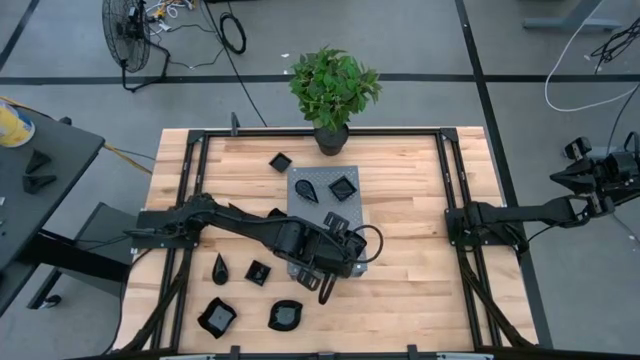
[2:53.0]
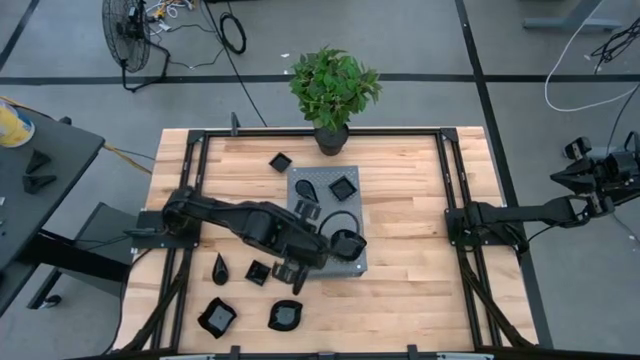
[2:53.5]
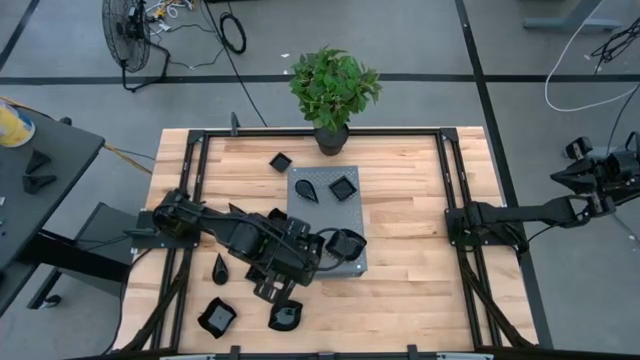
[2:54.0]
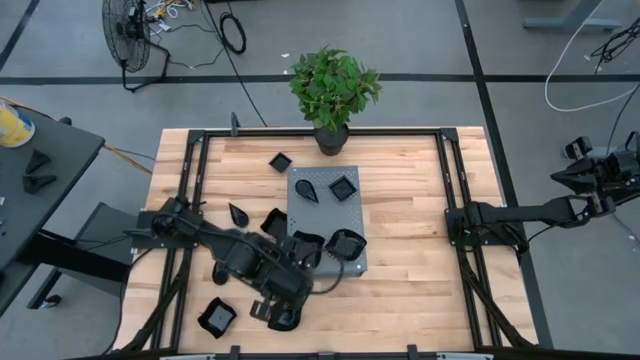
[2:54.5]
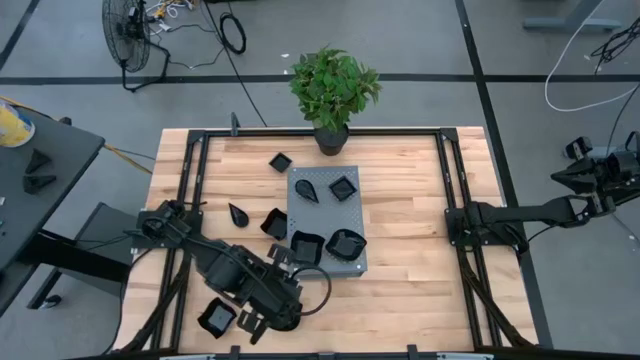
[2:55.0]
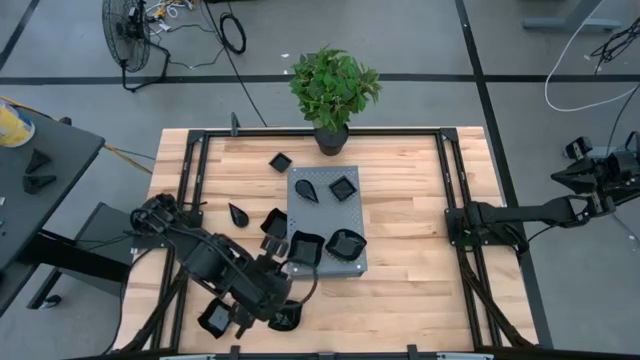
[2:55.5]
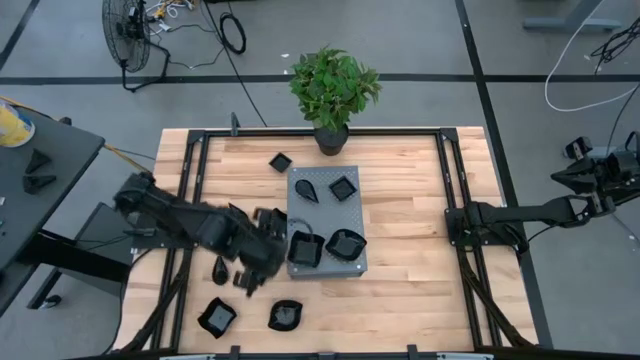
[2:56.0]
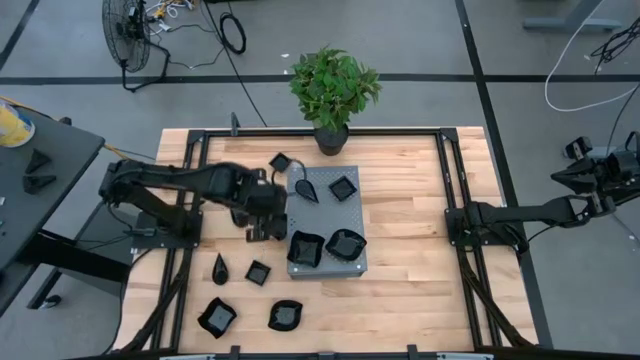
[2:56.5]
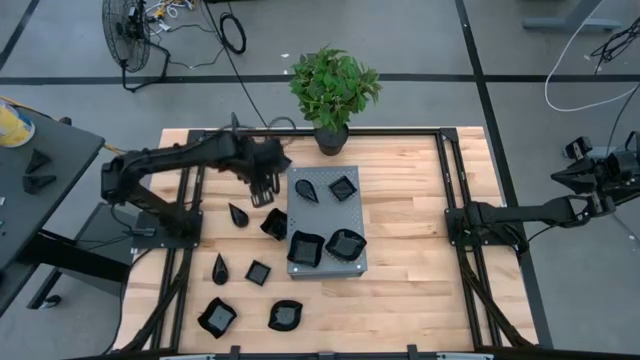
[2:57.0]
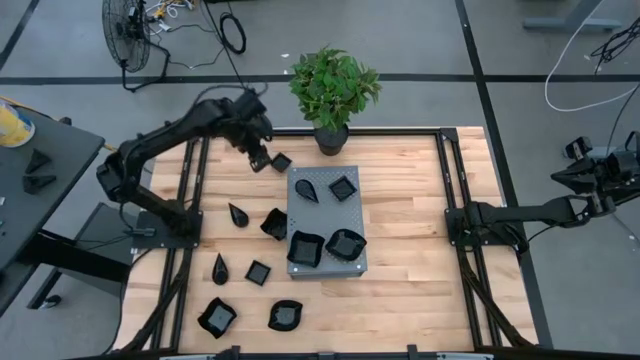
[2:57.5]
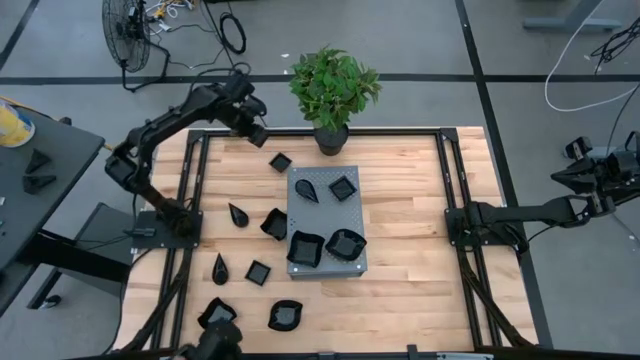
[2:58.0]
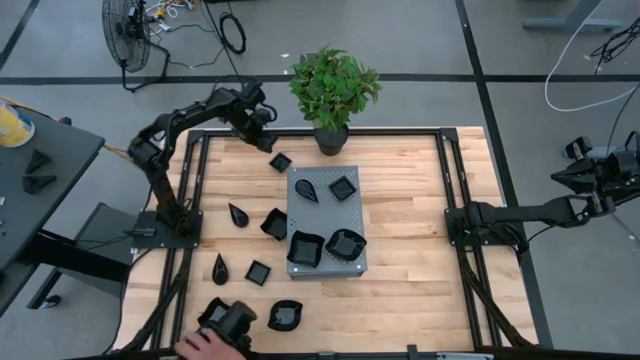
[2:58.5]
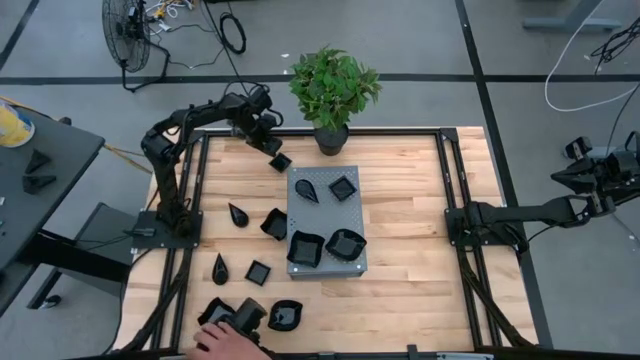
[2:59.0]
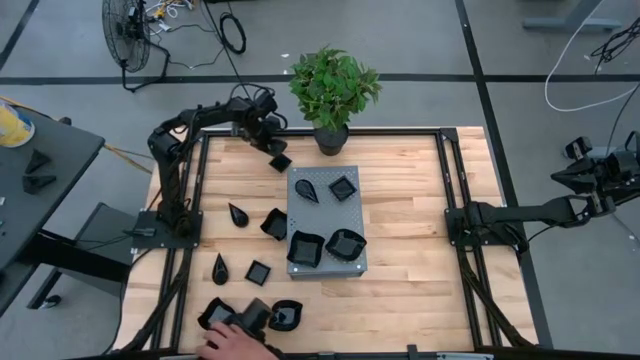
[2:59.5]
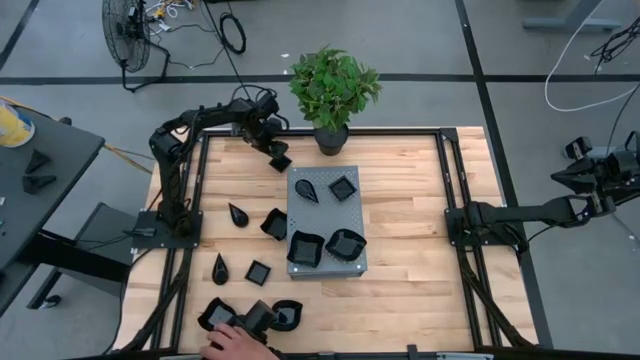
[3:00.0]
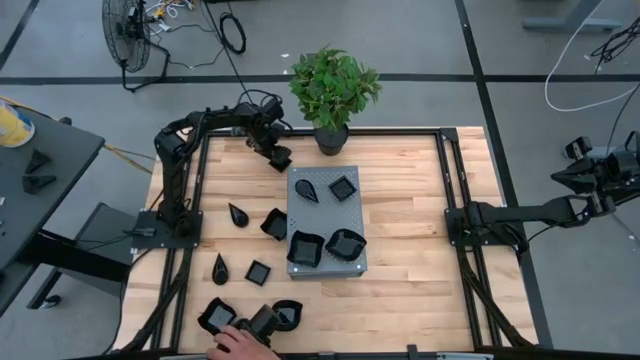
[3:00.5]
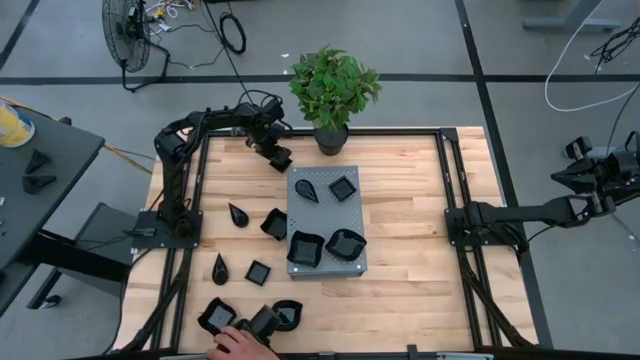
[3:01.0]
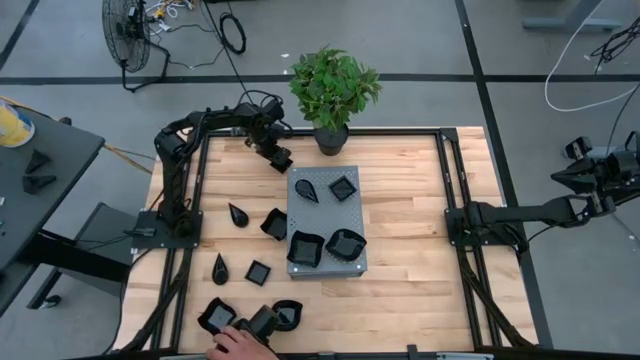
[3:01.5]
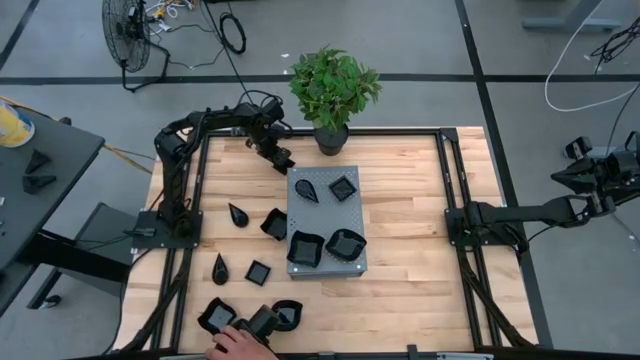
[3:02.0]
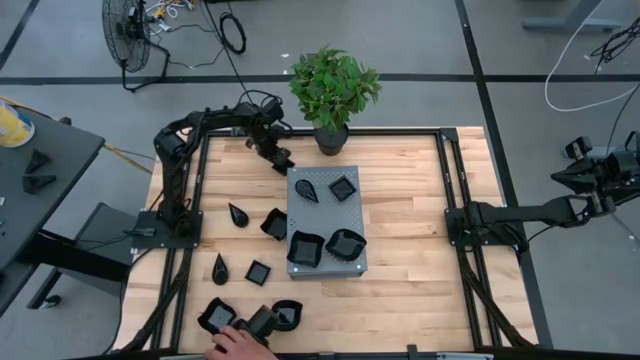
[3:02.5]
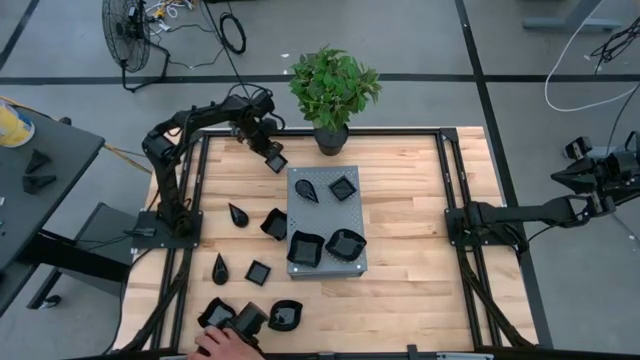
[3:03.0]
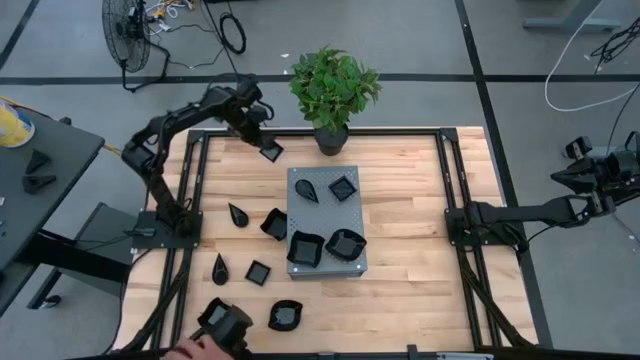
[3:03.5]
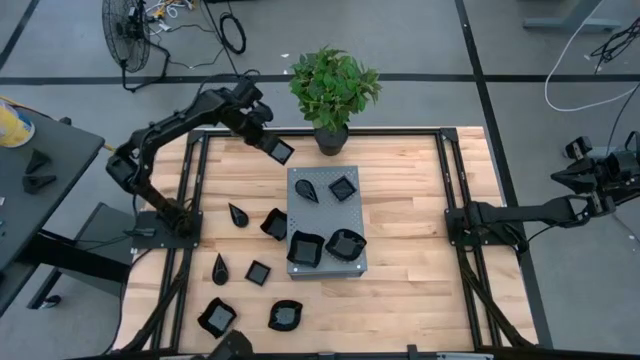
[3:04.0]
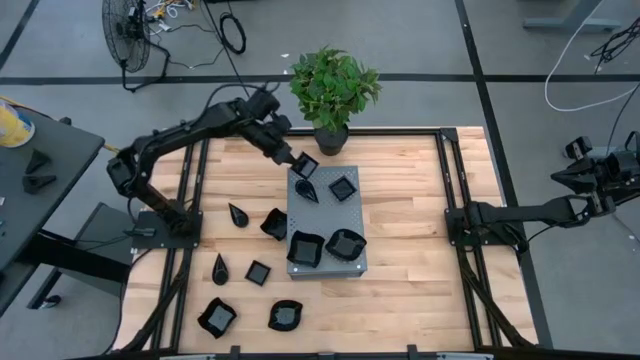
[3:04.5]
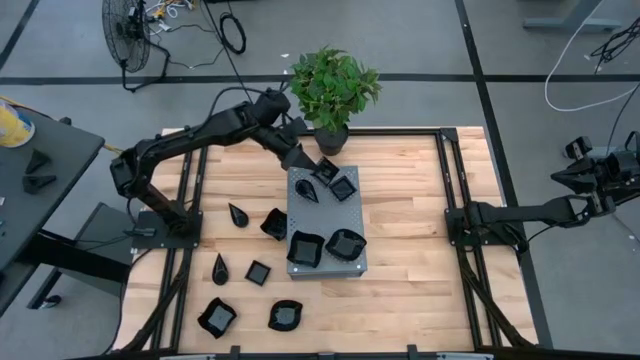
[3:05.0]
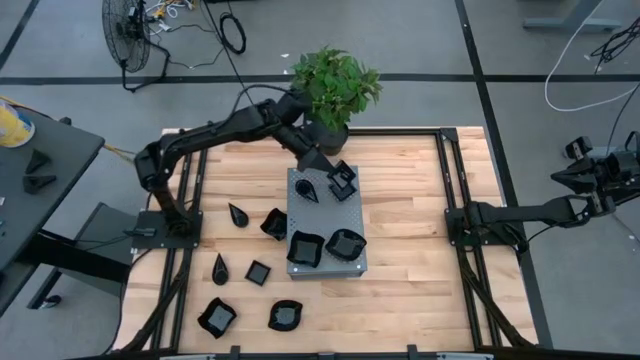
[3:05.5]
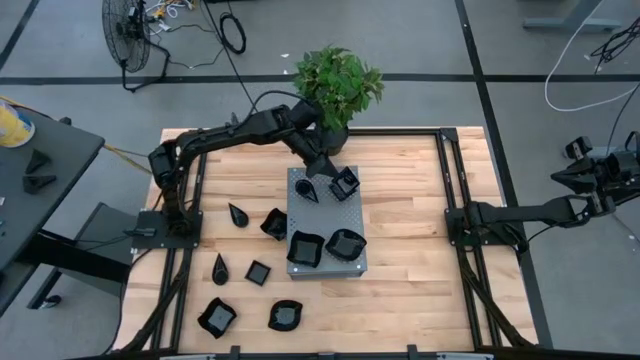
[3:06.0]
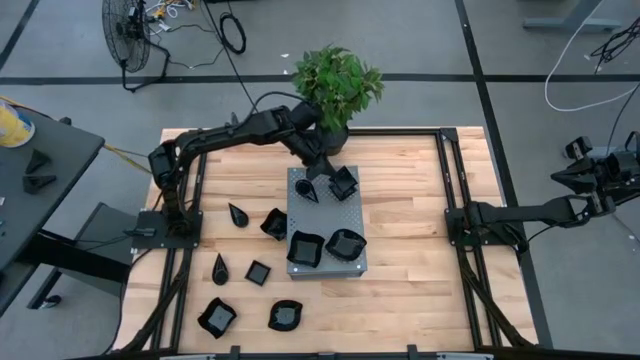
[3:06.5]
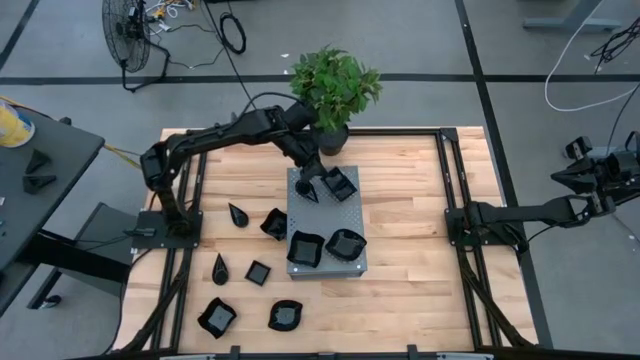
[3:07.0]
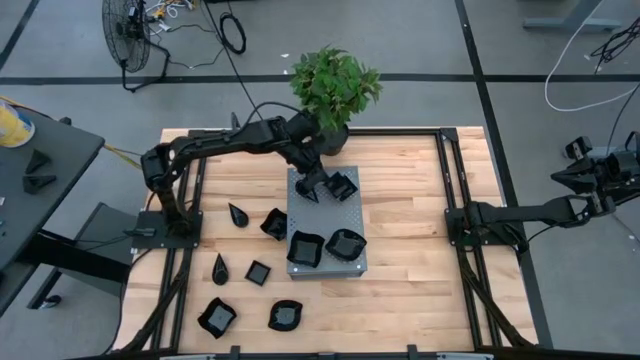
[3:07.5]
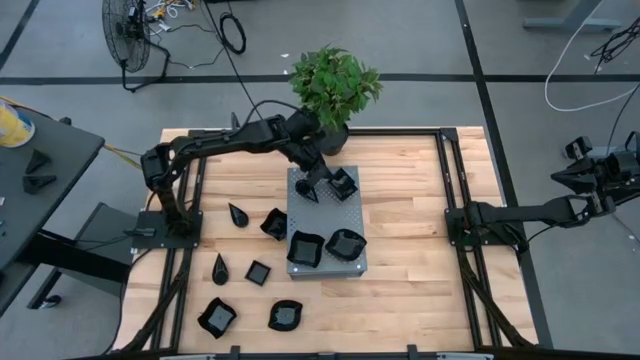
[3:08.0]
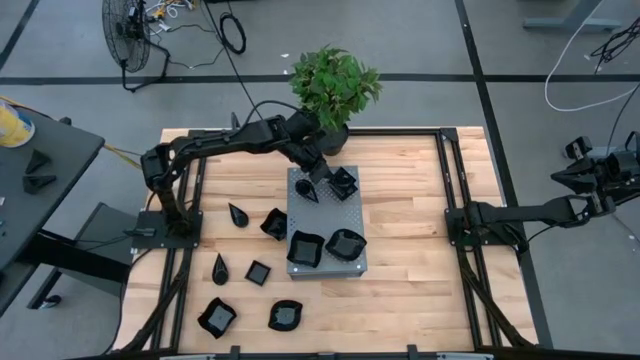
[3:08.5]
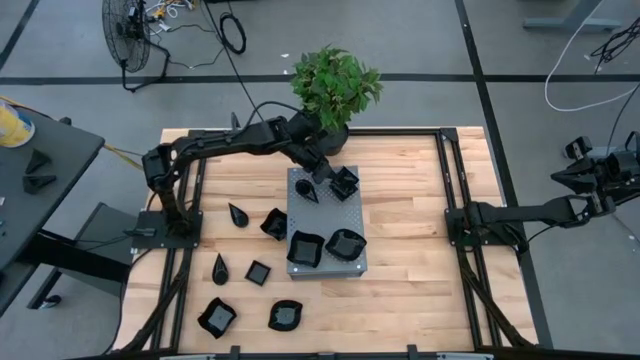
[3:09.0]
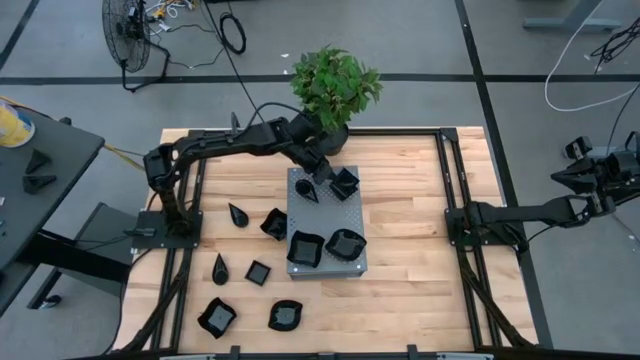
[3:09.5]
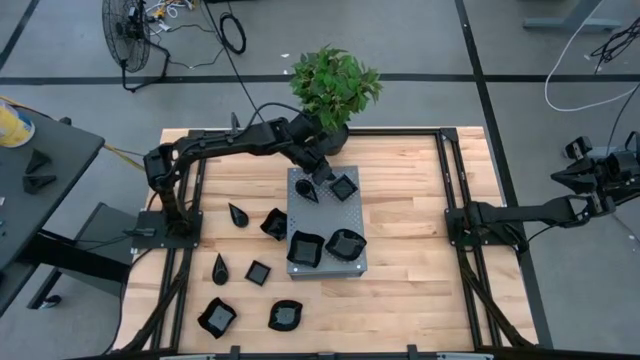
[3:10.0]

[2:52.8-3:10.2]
Task: Pick & Place Mini shaped plates
Stack the black bowl on top of the black bowl on the shelf

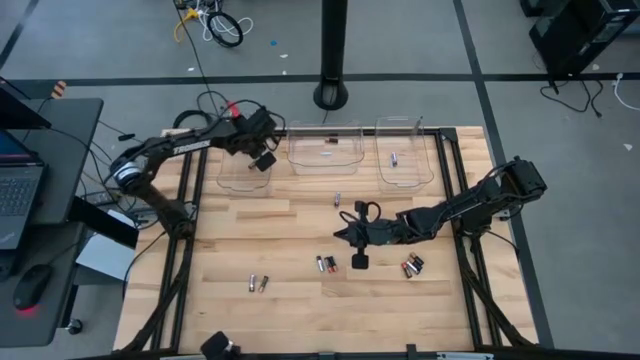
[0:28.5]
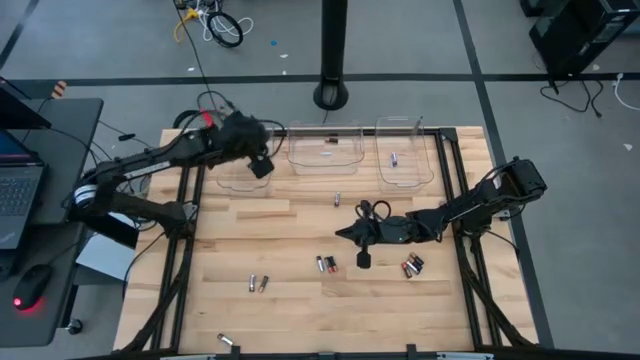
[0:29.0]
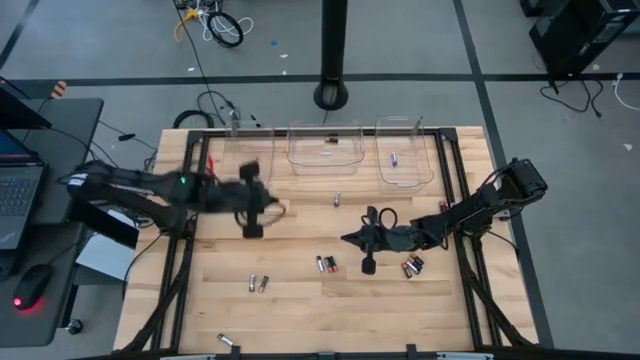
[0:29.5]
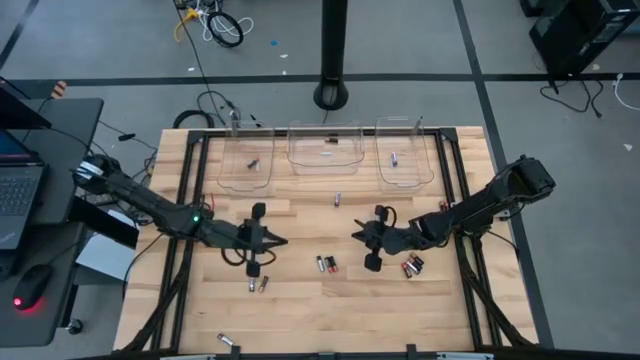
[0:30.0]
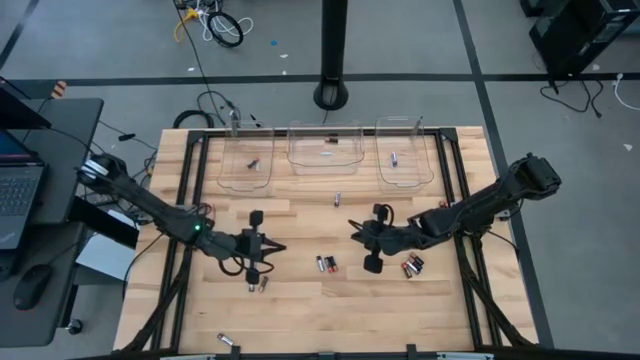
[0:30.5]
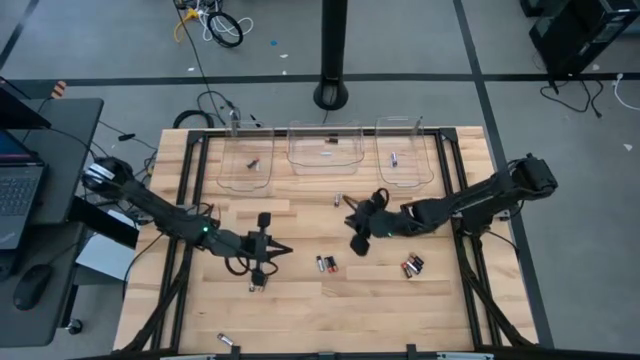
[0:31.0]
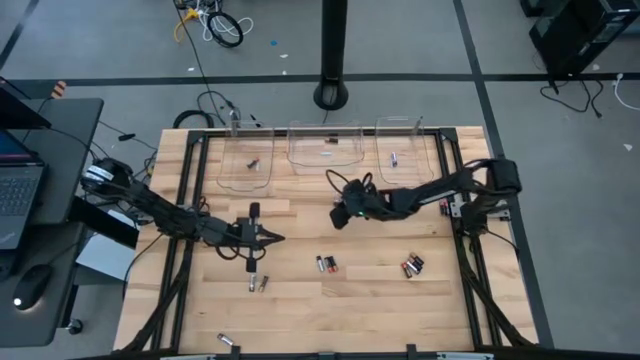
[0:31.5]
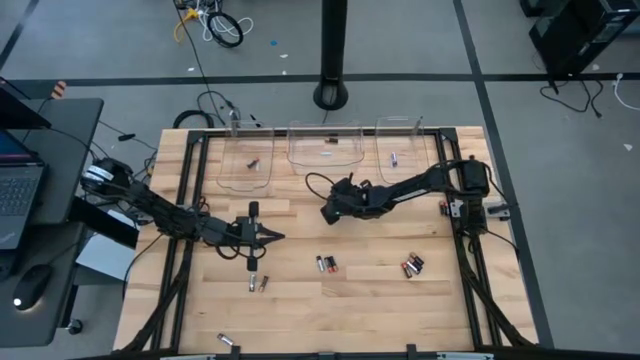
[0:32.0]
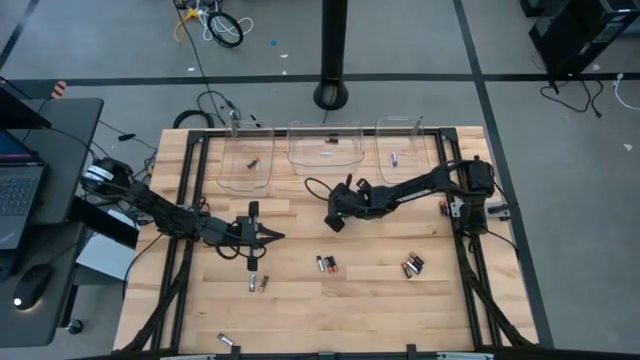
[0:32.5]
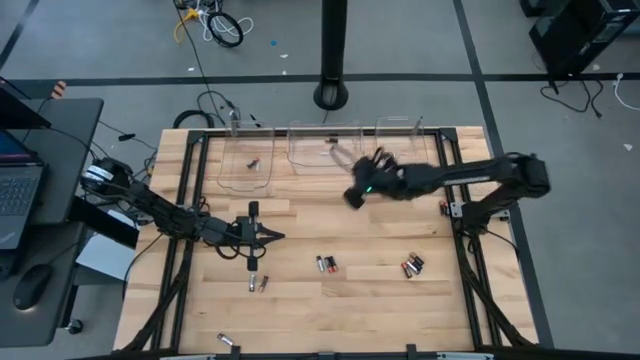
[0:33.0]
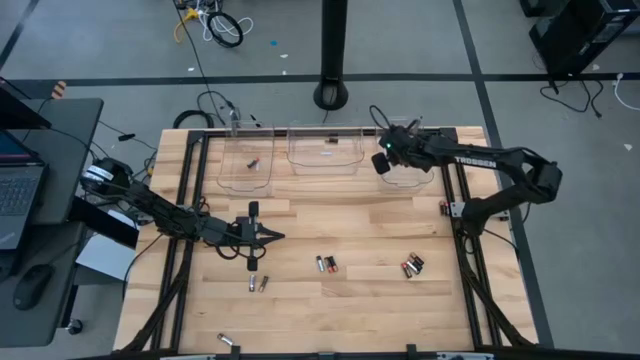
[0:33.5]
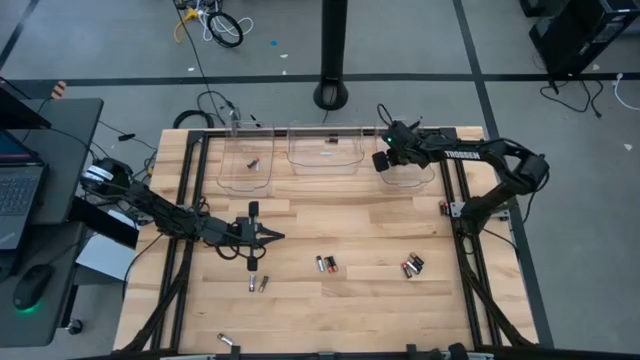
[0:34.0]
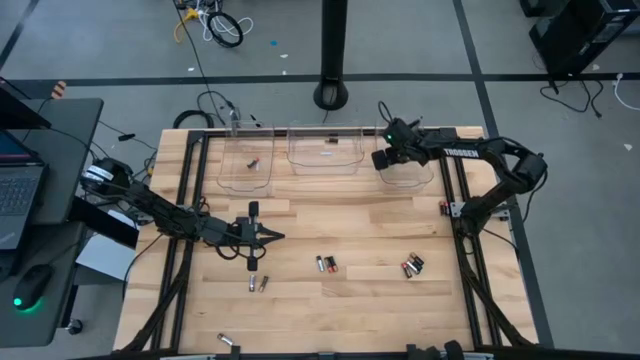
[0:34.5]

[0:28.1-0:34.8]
Task: Sort batteries
Put the silver battery into the right transparent bin
